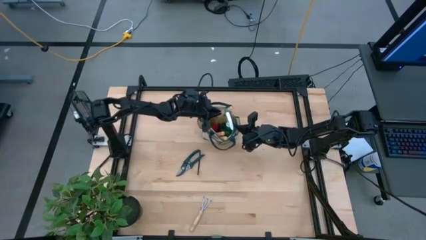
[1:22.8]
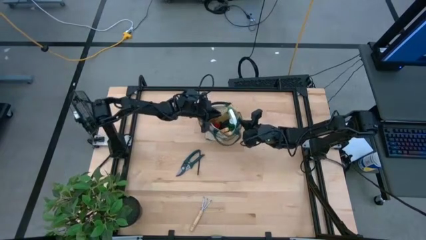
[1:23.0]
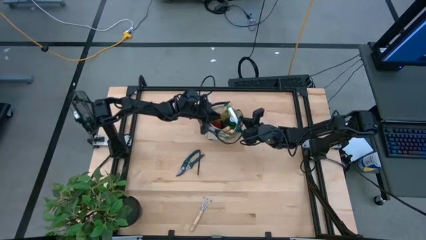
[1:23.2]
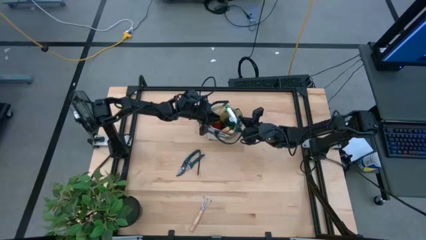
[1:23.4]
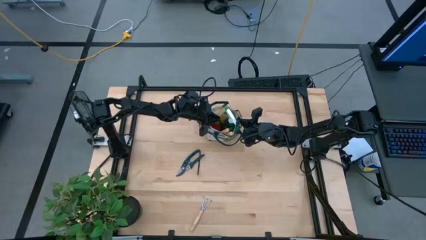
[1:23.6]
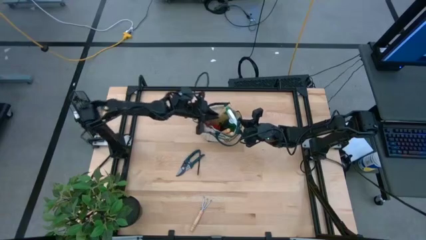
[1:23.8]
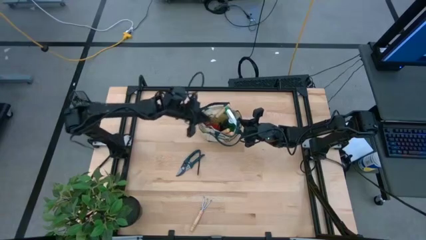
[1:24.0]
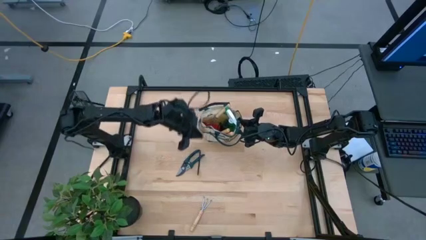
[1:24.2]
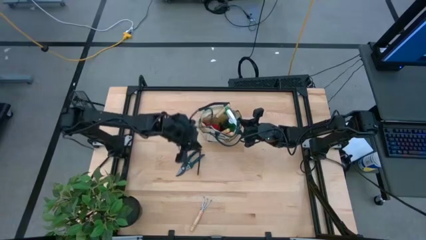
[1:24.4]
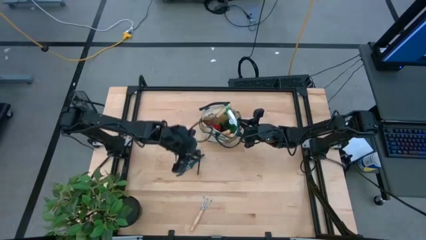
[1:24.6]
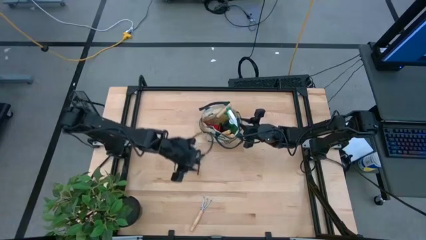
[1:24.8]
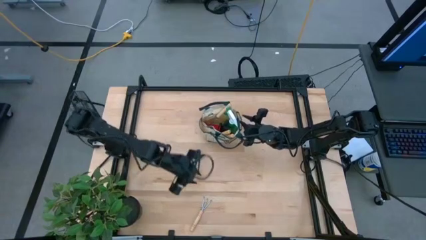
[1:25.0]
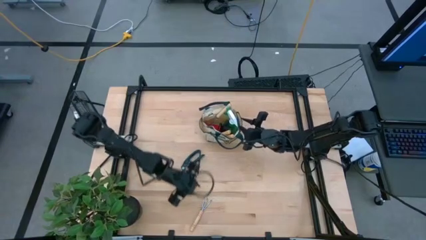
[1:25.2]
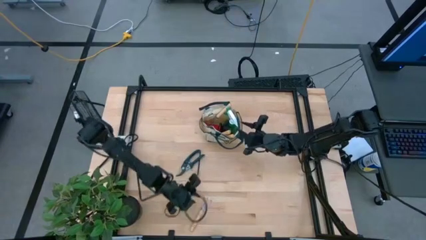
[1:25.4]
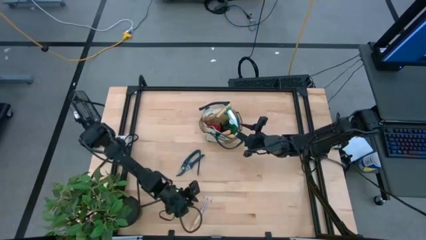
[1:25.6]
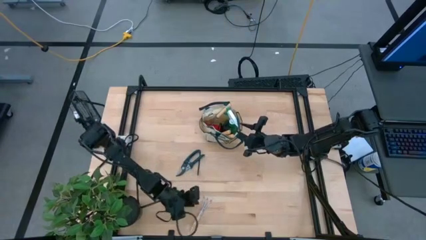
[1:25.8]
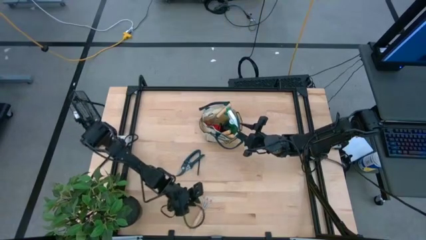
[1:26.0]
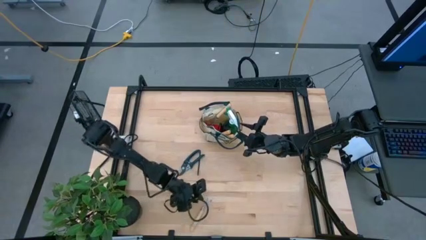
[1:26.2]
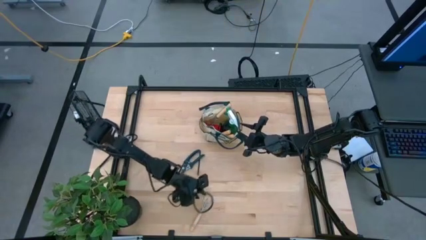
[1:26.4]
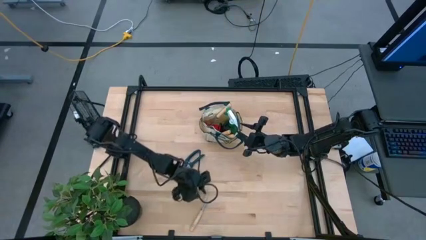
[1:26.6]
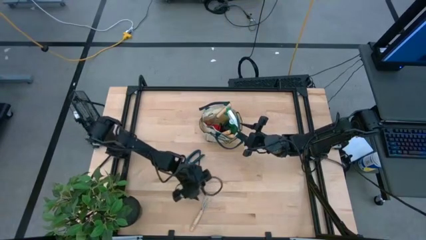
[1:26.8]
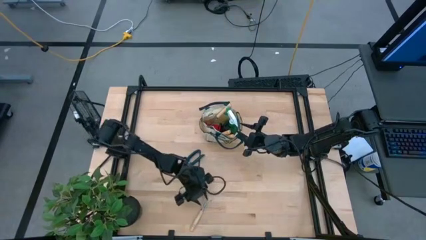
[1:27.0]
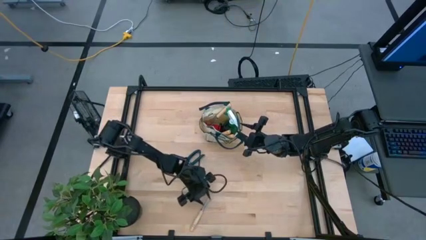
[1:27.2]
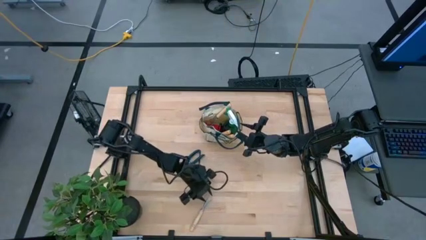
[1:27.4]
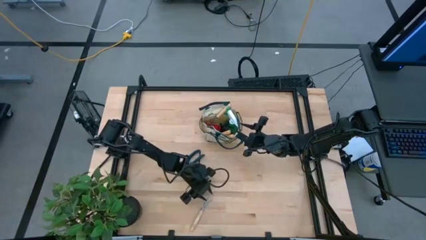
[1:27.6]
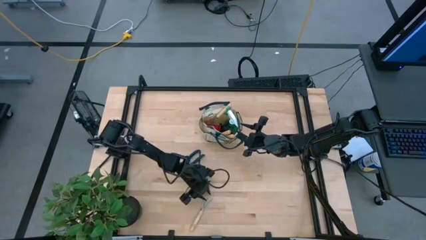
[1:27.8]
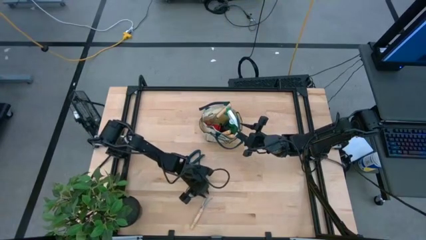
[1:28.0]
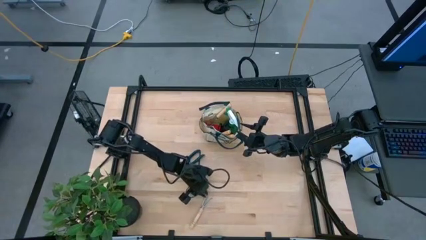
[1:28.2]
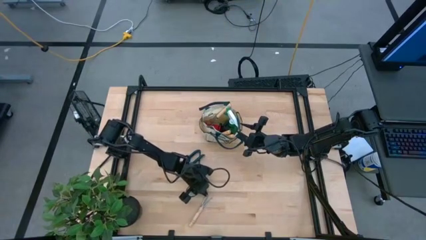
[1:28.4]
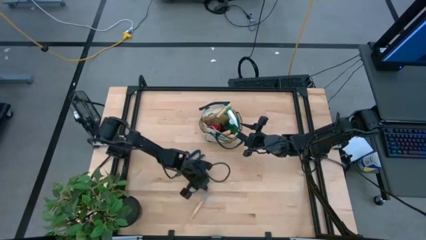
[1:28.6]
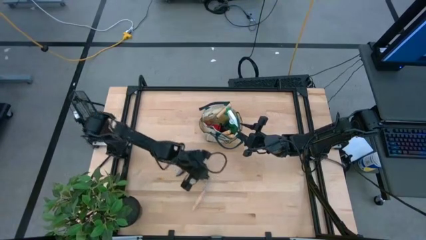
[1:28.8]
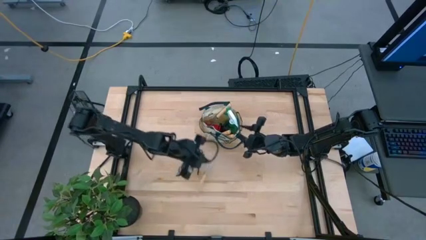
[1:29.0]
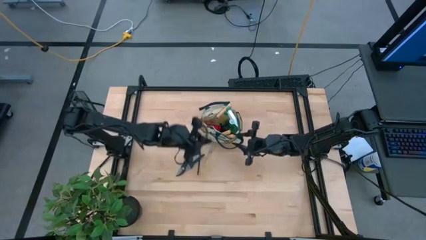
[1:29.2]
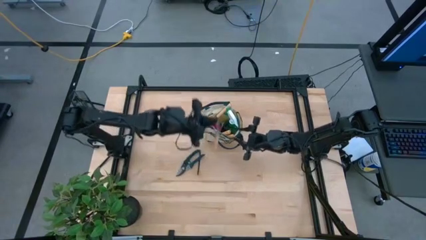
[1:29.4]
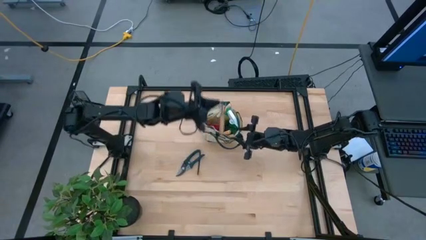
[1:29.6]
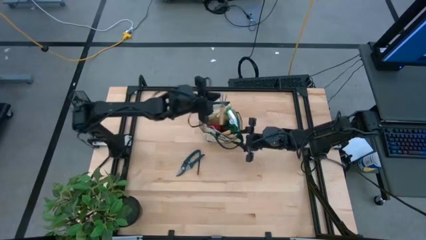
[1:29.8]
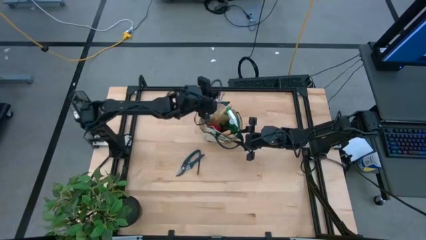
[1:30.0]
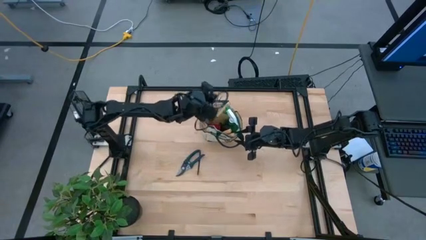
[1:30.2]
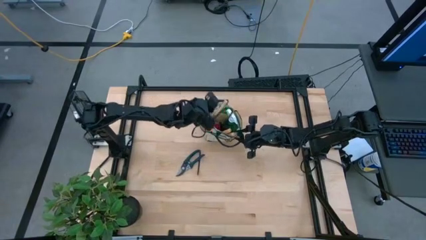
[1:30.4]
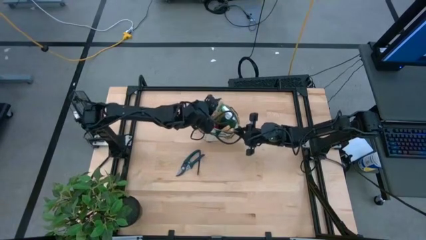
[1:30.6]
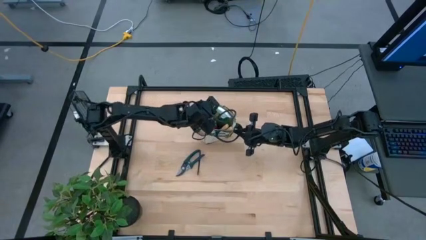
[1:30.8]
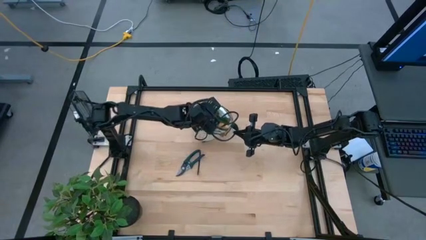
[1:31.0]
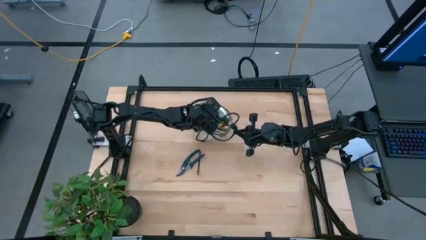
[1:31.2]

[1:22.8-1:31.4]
Task: Pick & Place Garden tools in Gardening bag
Put the hand rake into the gardening bag

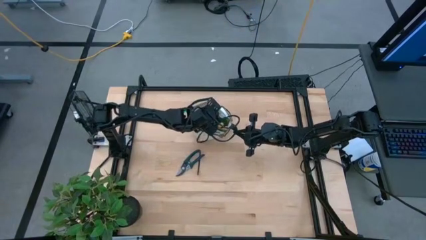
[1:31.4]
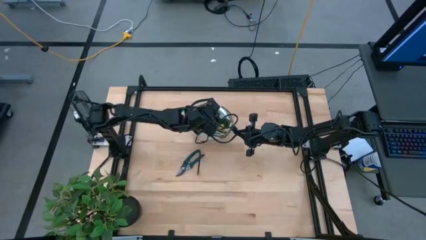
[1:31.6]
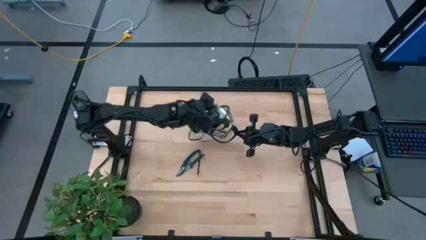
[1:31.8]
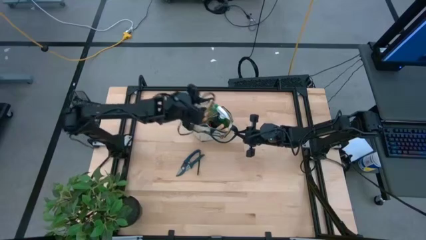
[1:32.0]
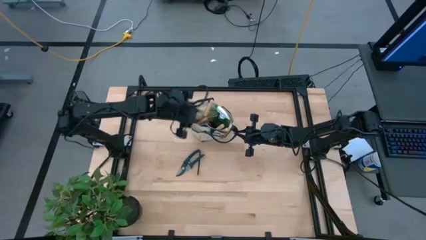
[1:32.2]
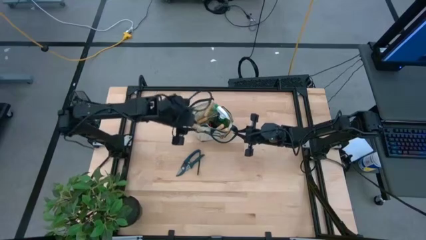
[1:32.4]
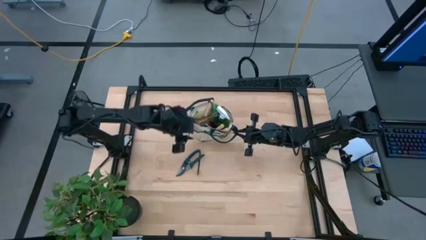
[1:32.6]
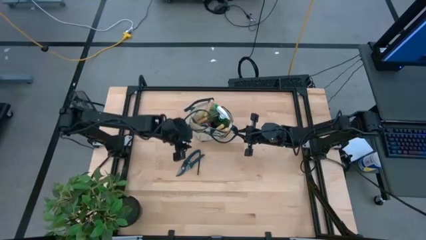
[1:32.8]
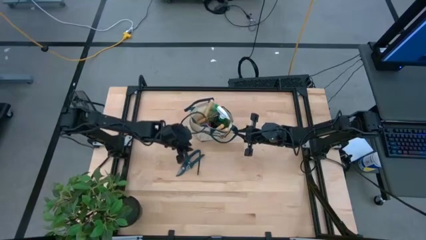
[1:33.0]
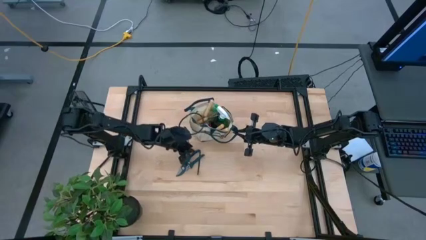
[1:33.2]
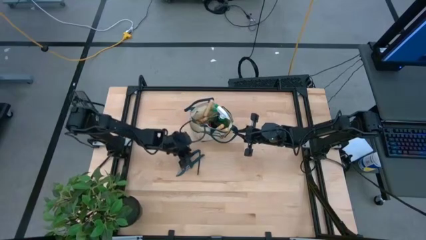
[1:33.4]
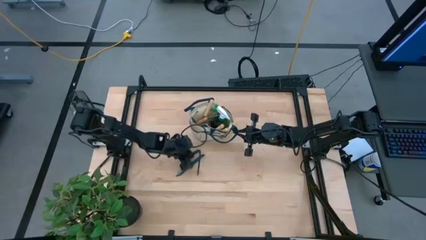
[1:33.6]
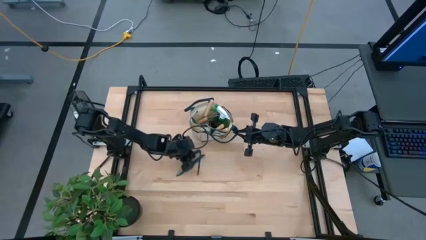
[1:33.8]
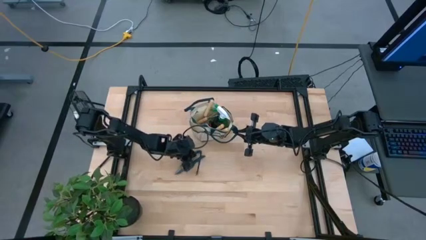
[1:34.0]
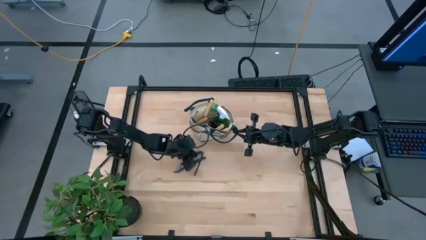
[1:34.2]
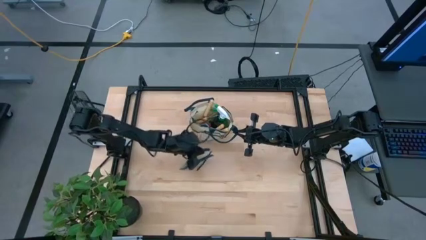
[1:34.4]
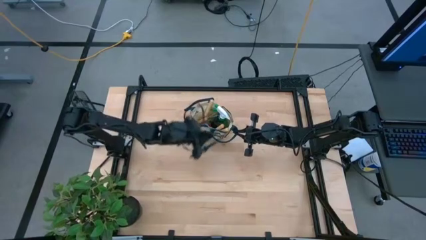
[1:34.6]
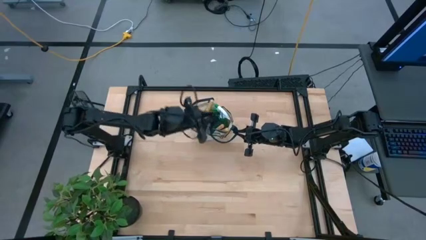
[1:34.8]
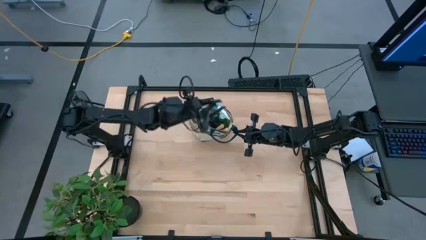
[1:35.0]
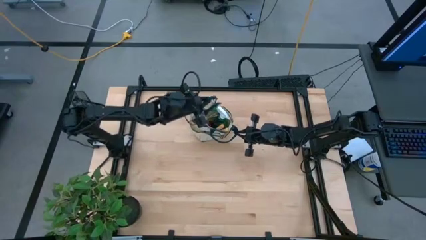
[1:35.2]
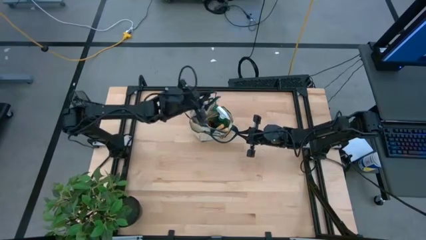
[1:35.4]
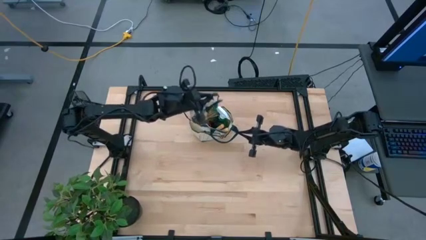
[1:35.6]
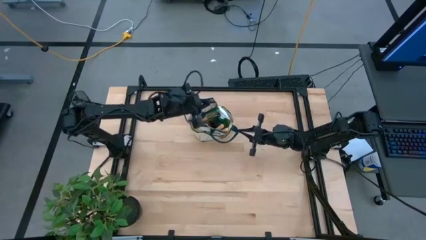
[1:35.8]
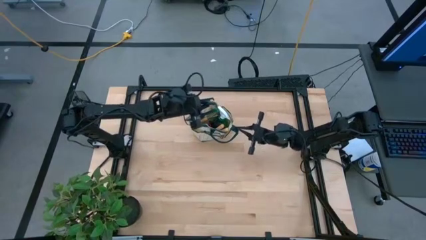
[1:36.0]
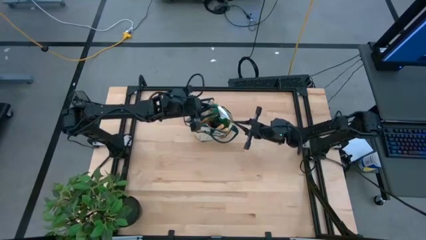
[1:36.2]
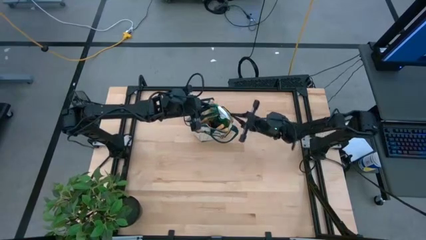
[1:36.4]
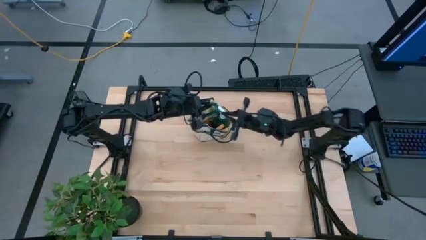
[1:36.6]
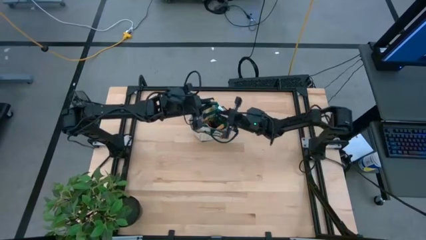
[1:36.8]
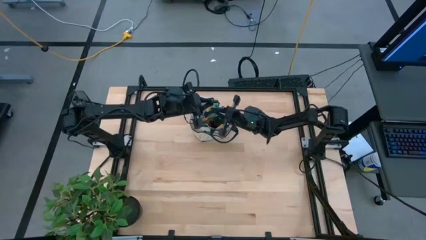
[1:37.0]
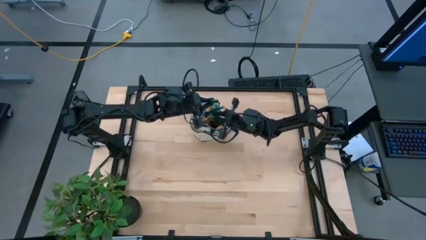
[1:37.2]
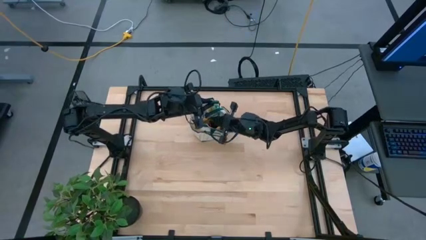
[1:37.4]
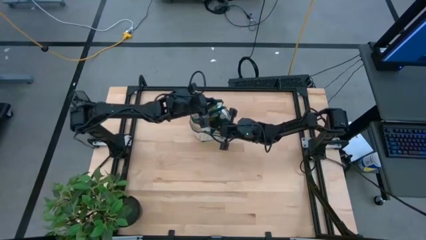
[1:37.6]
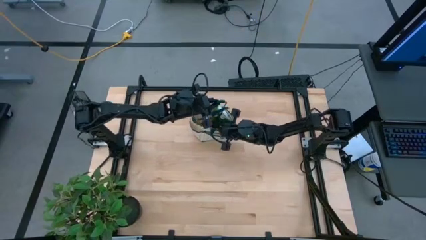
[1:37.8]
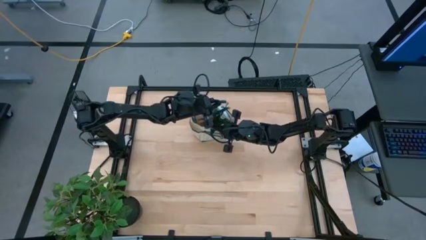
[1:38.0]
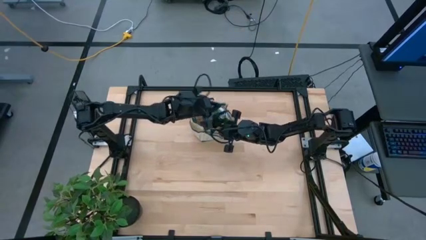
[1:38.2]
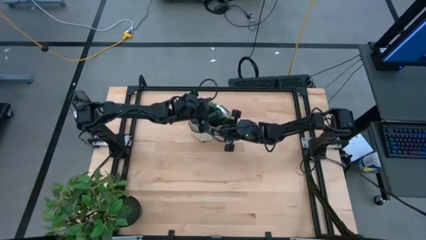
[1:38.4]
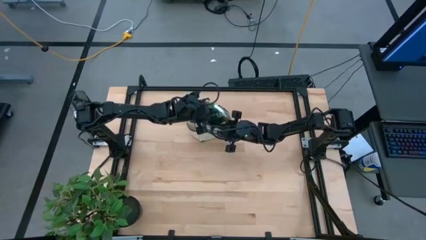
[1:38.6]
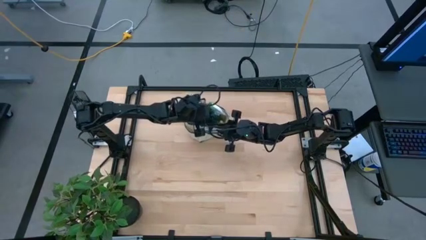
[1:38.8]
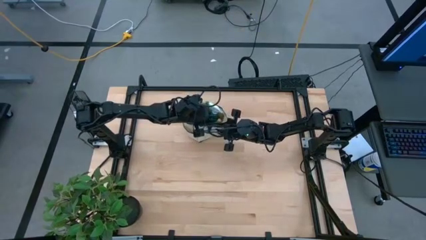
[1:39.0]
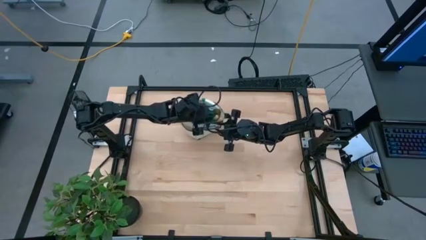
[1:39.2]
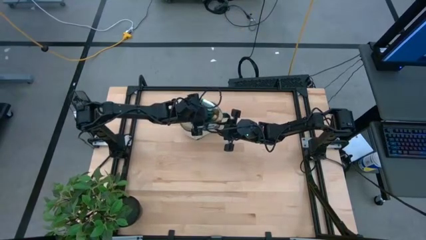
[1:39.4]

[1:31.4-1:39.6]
Put the shear scissors into the gardening bag
